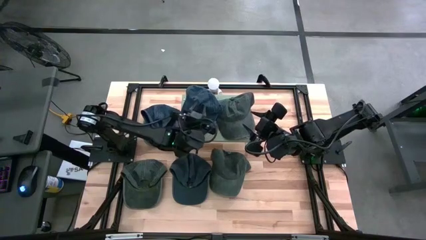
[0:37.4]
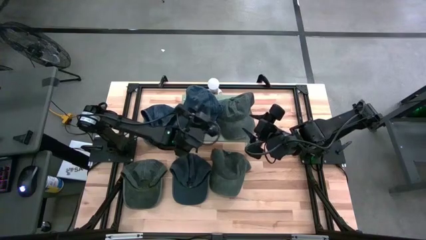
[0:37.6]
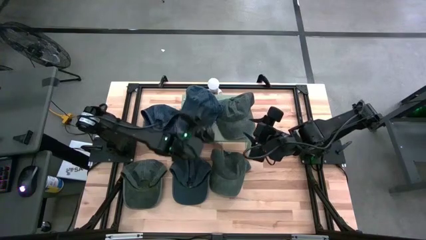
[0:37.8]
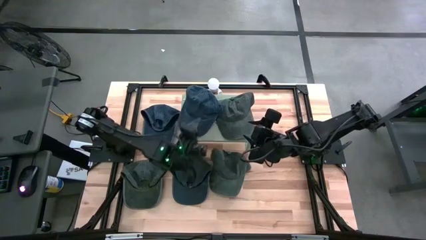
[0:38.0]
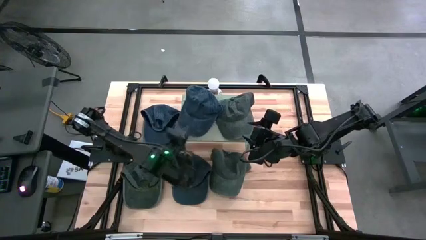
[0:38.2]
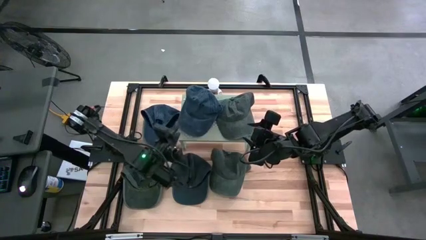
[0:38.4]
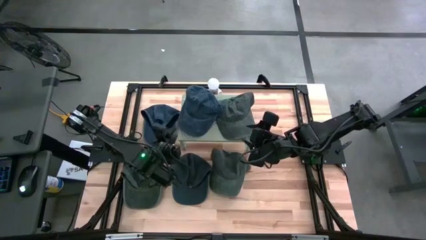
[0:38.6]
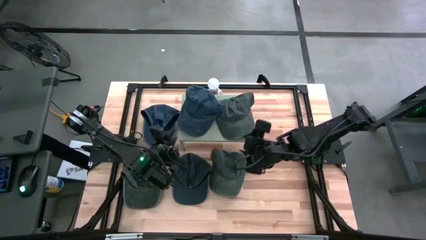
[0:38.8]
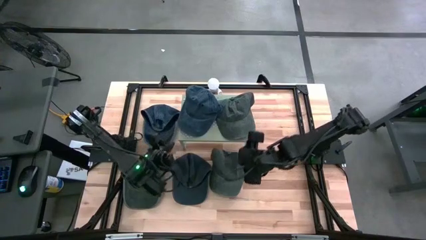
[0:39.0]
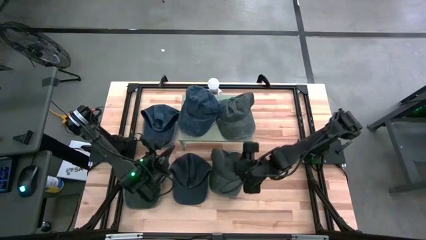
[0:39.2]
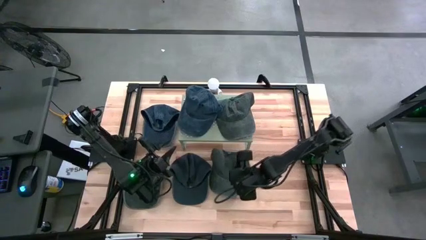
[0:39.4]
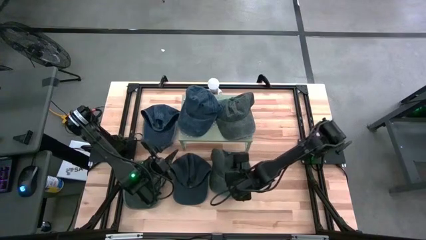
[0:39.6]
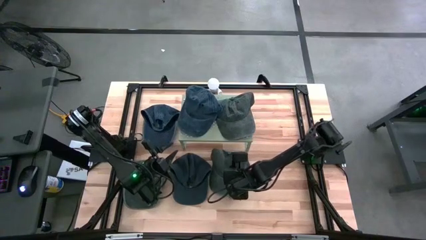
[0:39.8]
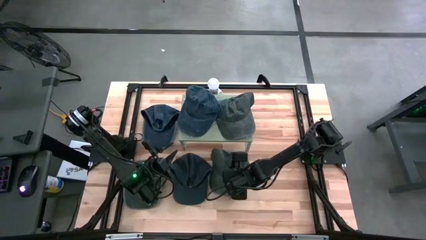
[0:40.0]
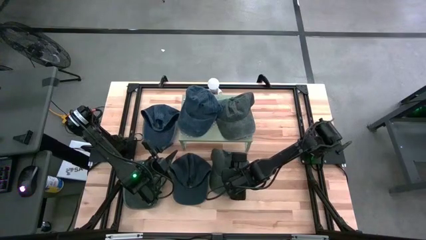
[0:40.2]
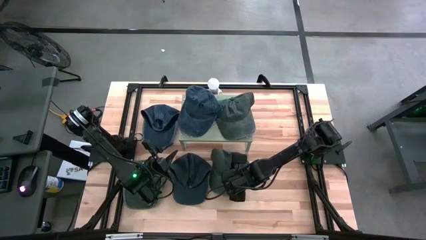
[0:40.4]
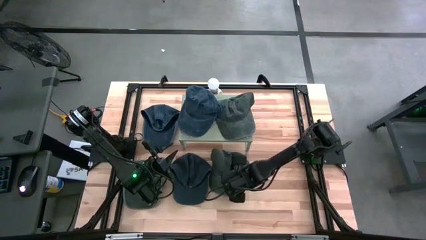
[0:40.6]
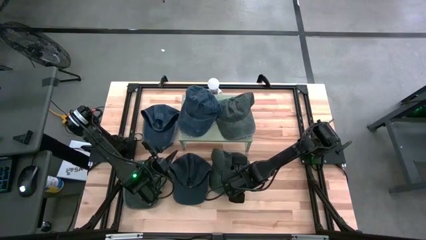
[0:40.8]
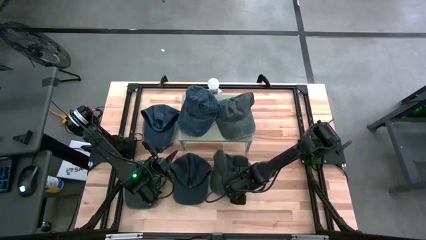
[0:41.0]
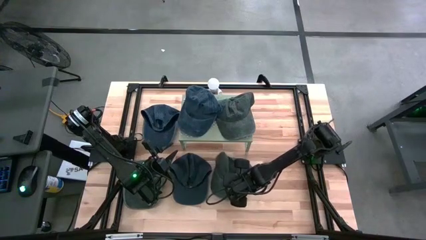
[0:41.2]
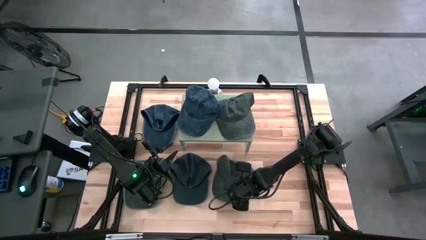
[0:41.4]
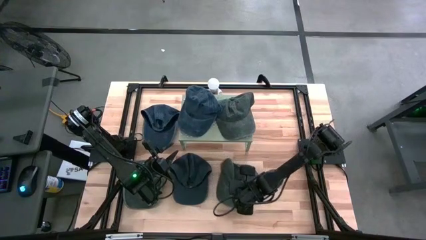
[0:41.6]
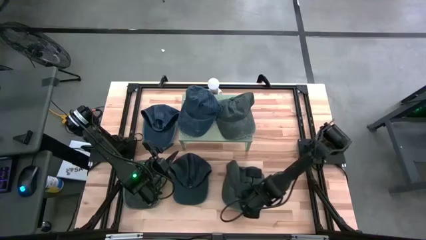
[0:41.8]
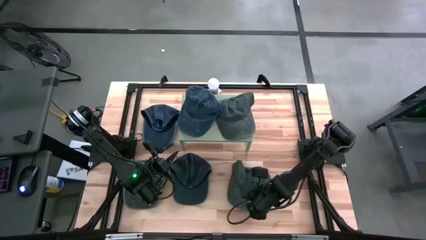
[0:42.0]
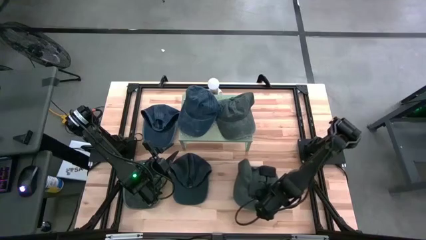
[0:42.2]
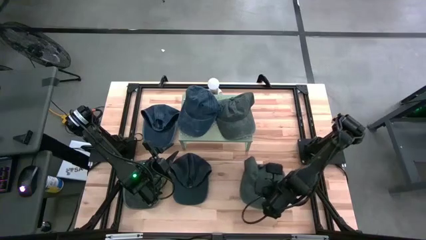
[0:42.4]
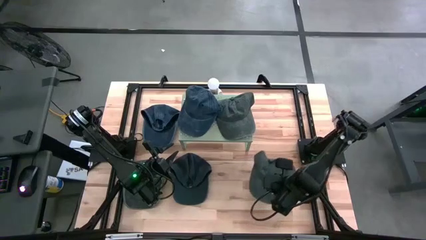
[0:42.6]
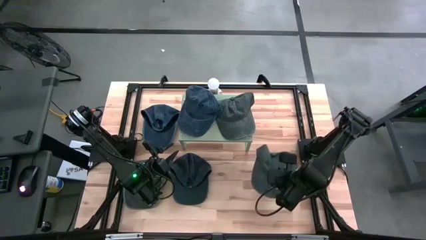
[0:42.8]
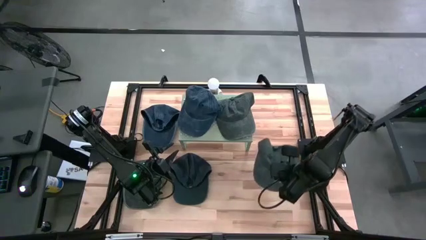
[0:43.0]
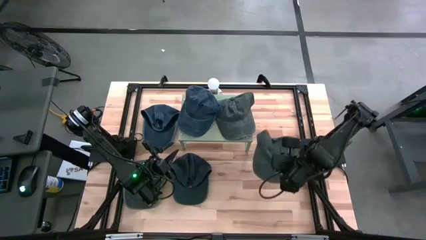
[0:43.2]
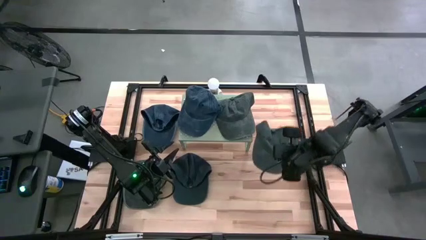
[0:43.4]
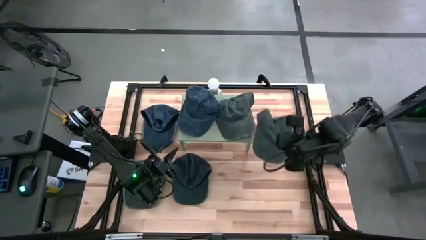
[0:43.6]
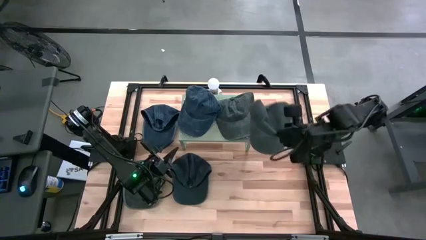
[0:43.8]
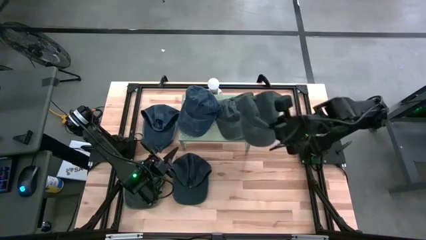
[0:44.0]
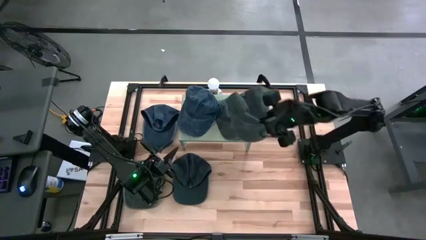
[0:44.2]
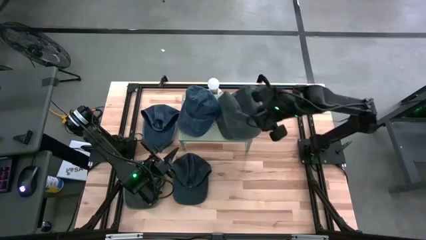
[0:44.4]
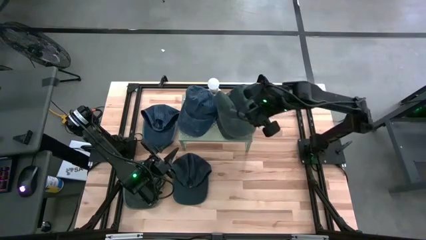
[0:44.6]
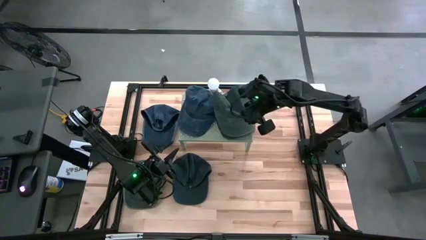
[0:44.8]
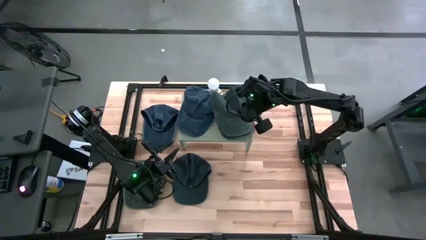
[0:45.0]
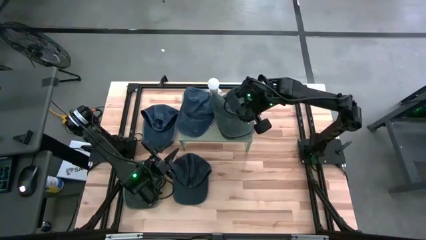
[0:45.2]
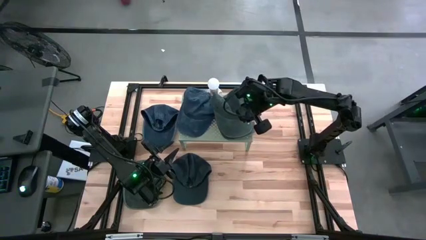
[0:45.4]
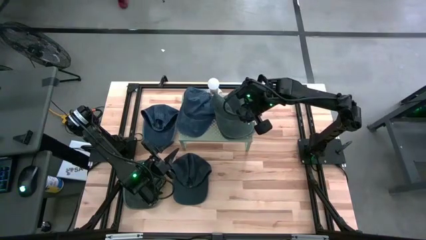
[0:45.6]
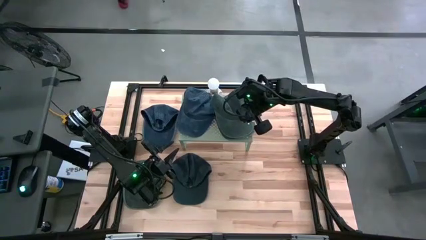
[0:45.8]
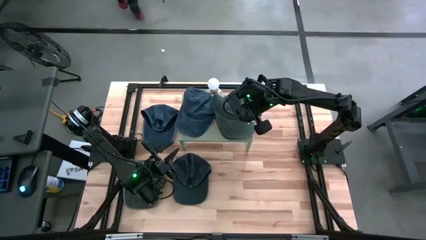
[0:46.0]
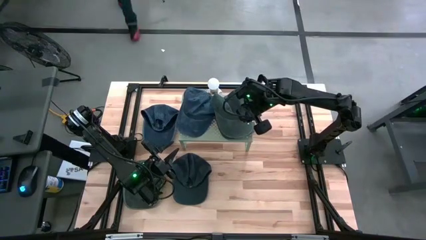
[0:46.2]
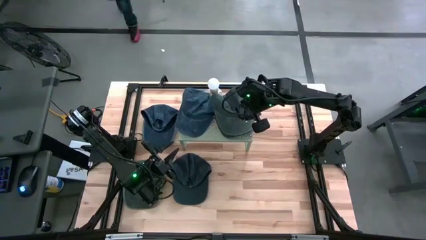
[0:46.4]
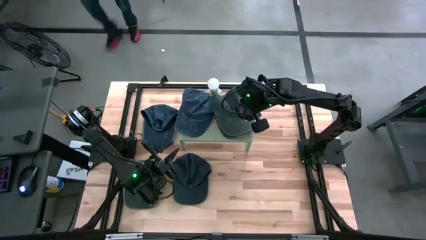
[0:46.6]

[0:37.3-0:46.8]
Task: Pick & Place hat
Stack the right gray cap on the top of the gray cap on the shelf

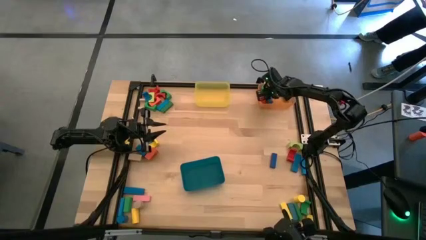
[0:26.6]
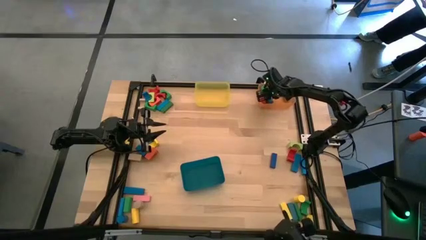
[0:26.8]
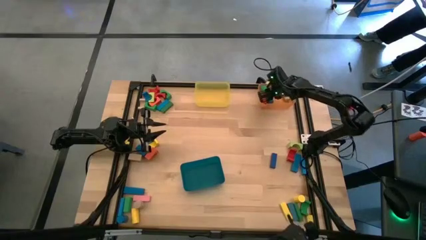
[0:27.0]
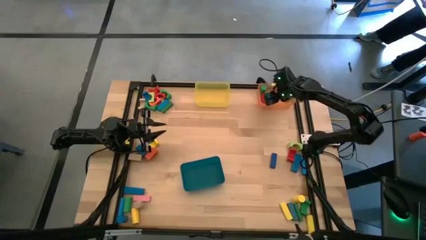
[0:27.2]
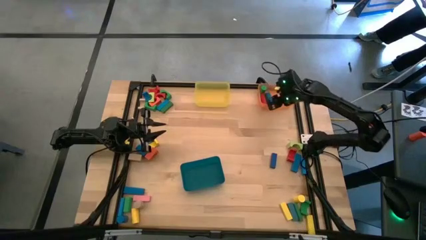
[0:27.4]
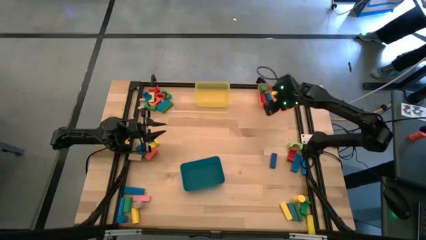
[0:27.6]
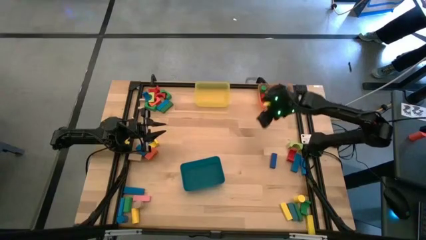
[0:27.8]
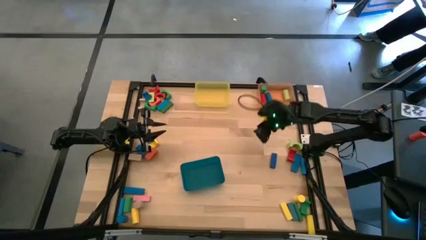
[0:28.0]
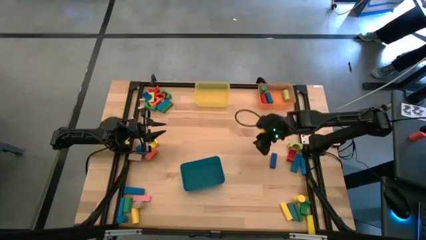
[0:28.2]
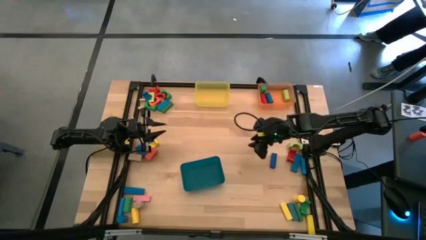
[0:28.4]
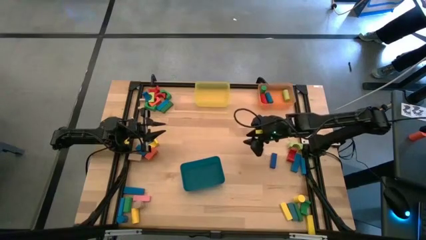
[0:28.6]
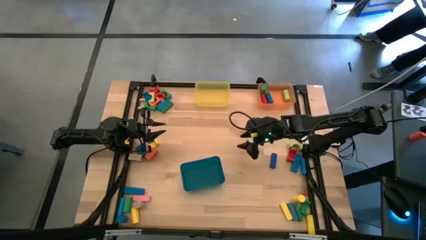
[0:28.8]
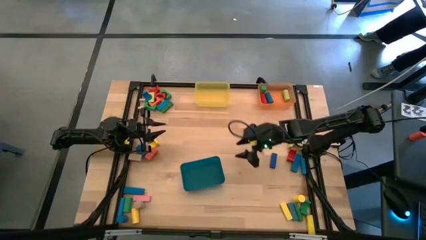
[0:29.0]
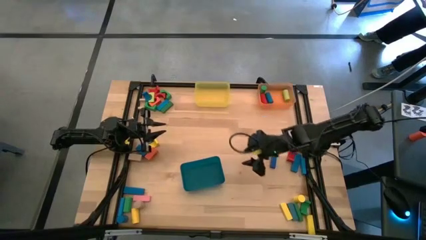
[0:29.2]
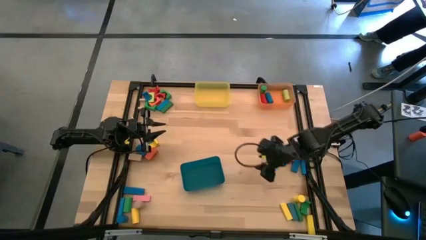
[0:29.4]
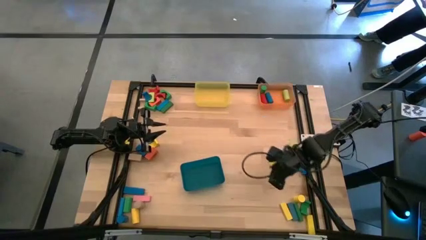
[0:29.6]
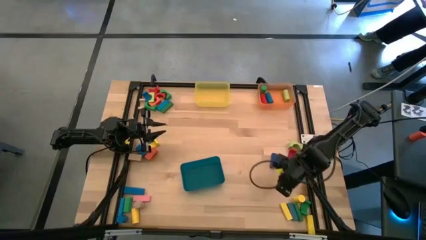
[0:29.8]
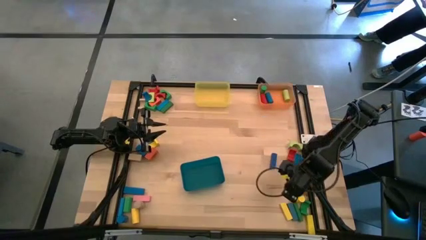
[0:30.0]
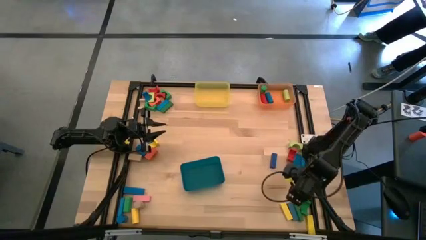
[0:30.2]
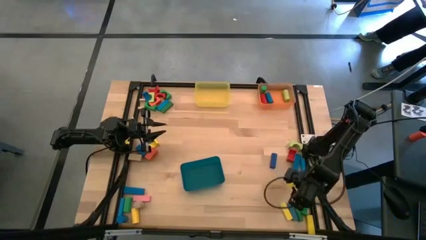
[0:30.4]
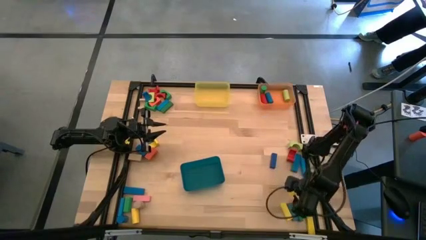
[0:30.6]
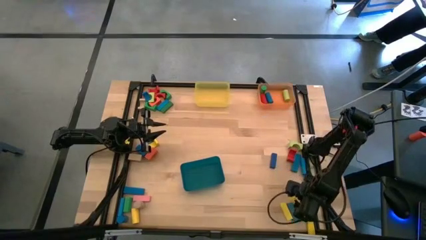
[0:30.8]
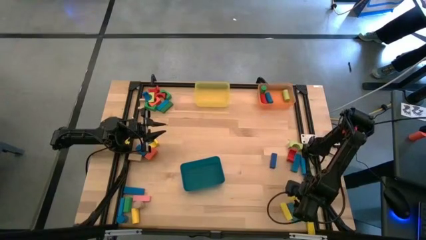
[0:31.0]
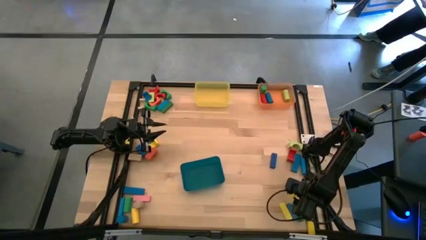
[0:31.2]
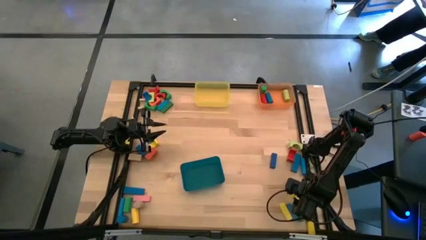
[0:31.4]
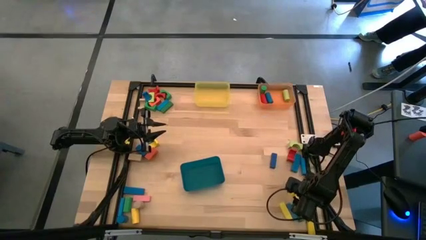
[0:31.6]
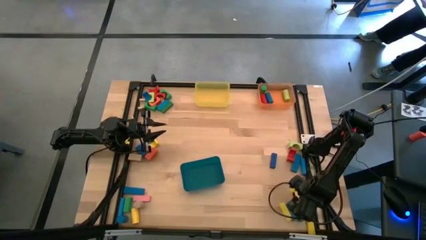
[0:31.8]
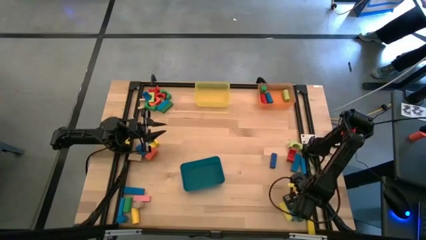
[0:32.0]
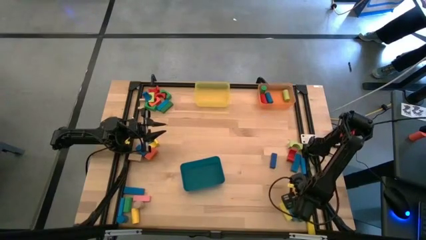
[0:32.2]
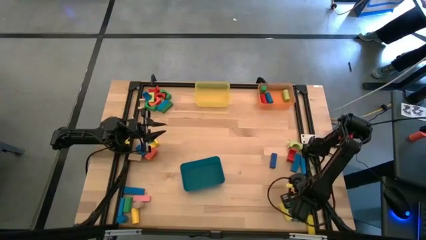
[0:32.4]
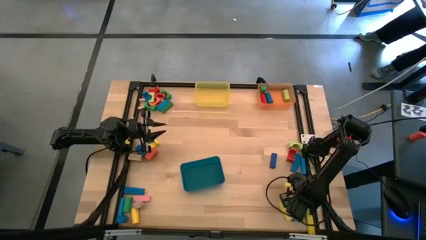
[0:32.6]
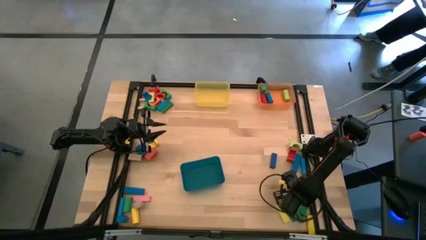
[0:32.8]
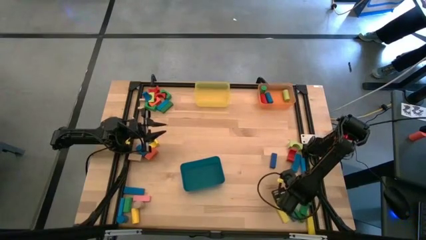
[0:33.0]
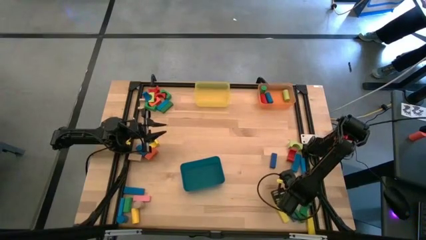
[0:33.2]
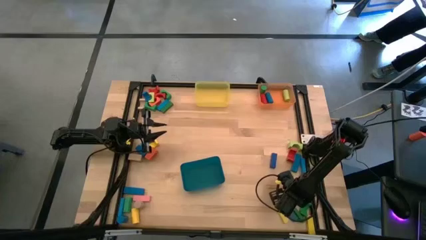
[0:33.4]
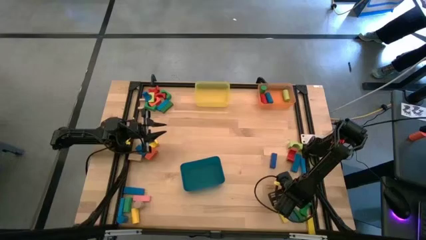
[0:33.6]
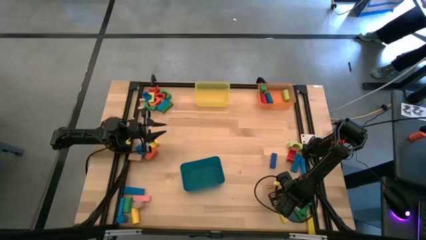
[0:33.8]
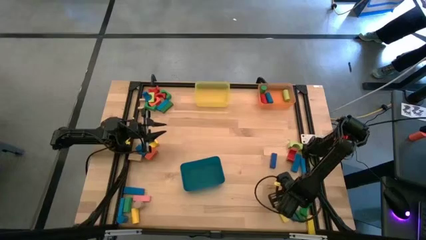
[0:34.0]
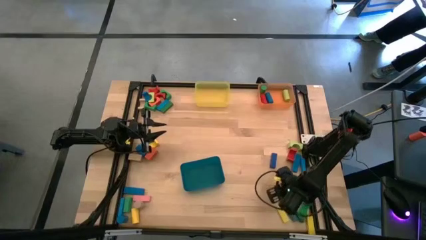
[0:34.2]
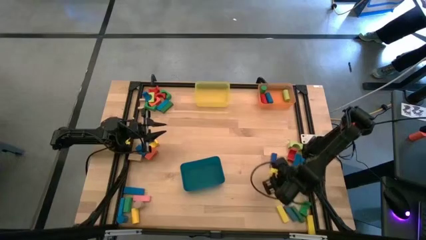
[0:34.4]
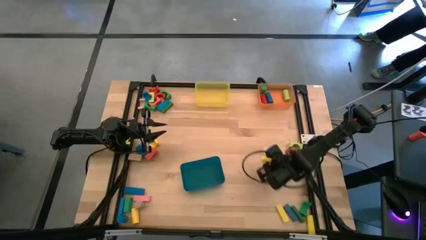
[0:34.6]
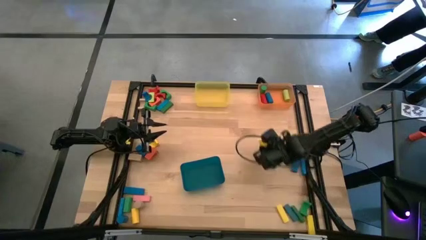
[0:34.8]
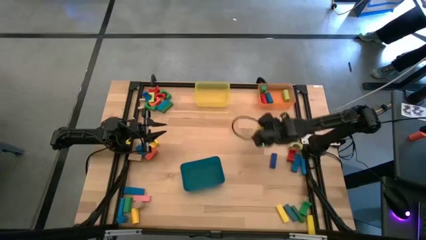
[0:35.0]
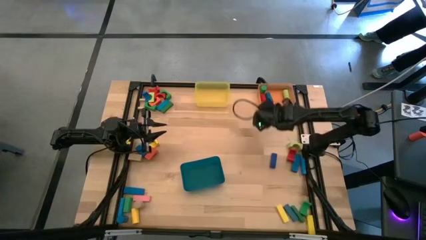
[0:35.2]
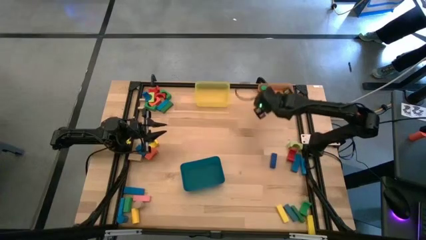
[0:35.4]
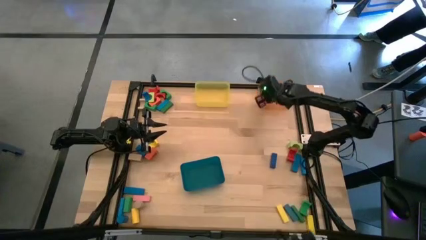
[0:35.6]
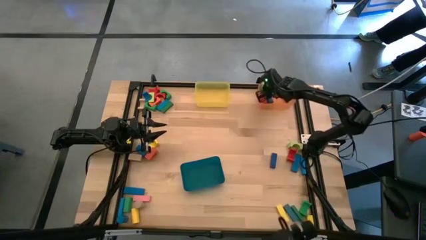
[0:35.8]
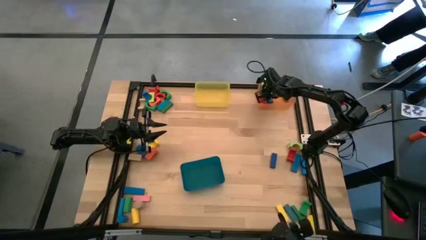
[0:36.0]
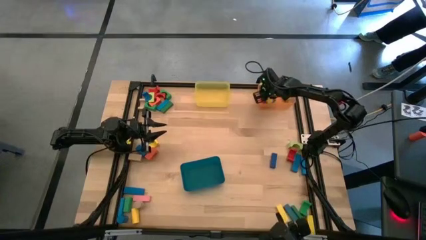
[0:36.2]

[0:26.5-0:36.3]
Task: Sort blocks by size
Put the yellow cylindrical block into the orange bin
